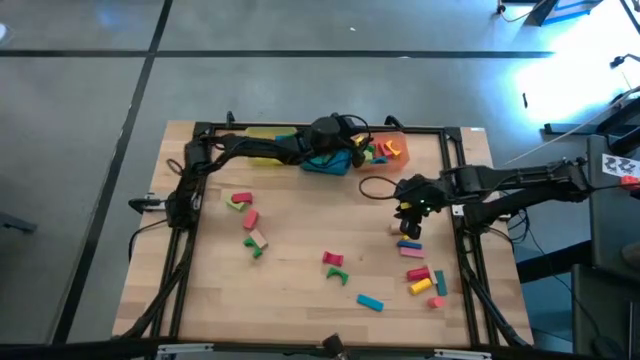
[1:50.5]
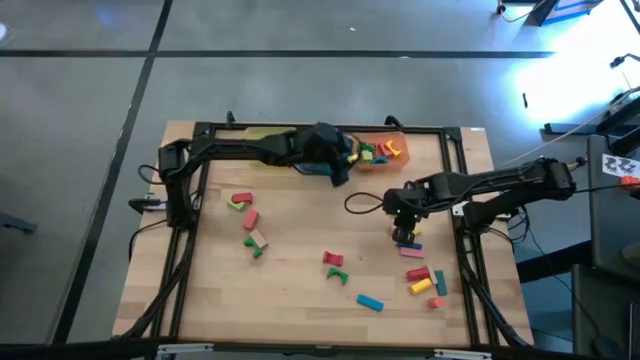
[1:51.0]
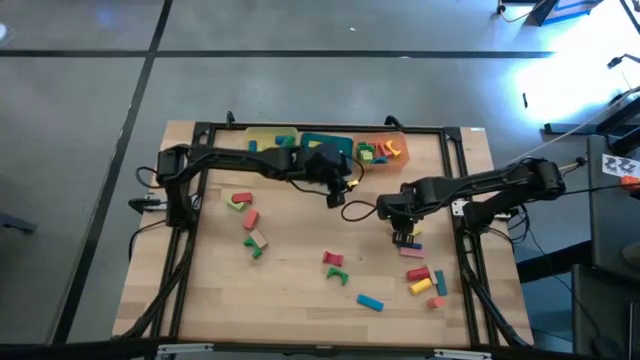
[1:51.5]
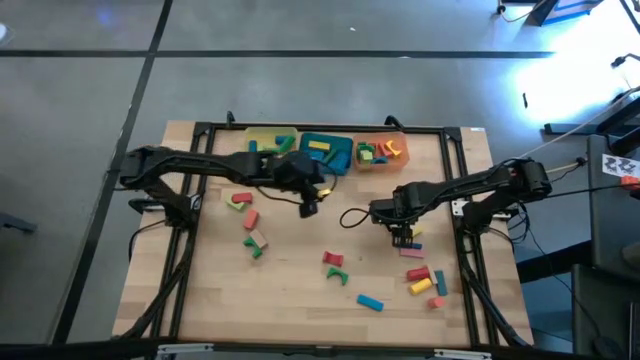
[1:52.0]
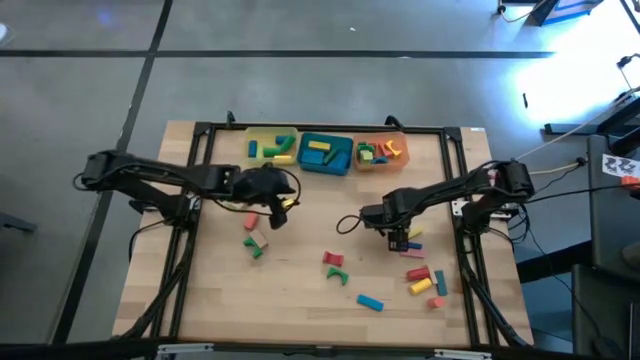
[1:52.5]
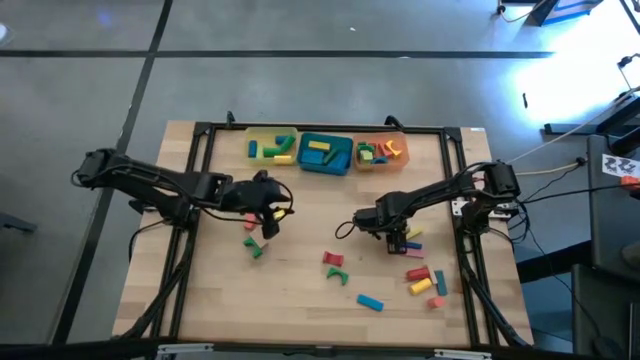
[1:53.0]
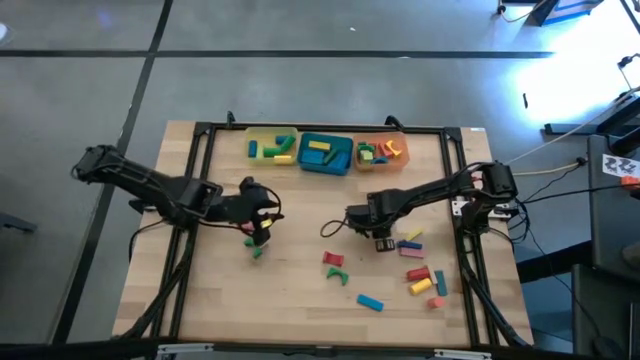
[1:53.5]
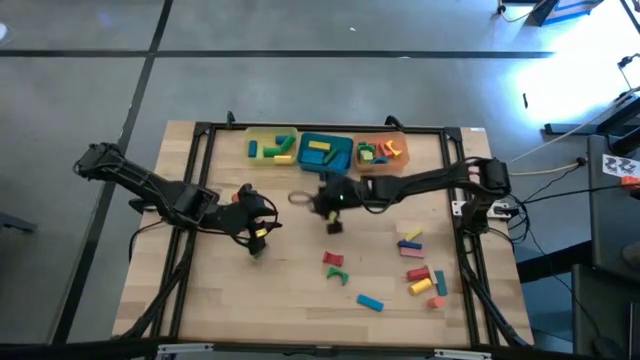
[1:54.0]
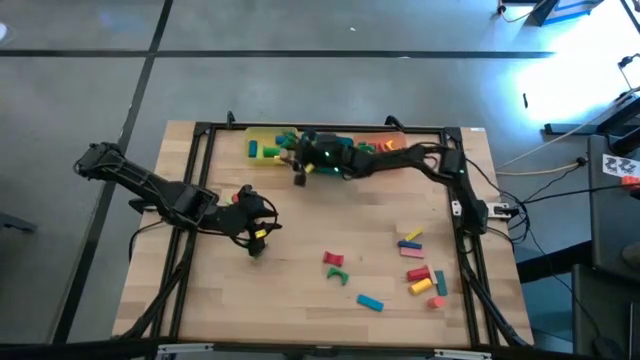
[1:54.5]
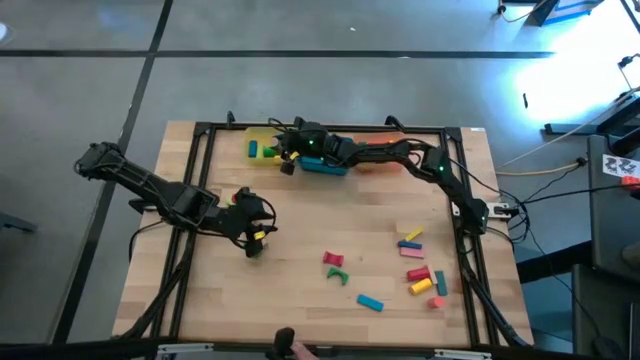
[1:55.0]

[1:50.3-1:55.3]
Task: Sort blocks by size
Put the brown cylindrical block into the yellow bin

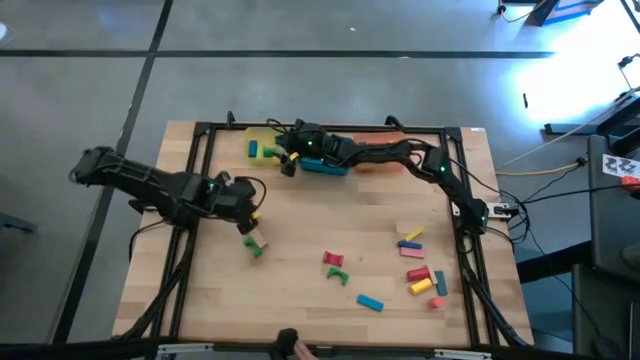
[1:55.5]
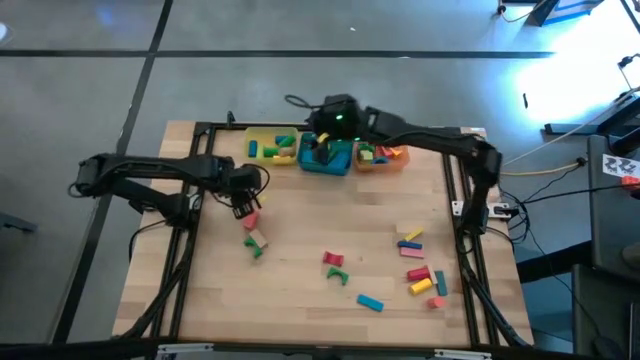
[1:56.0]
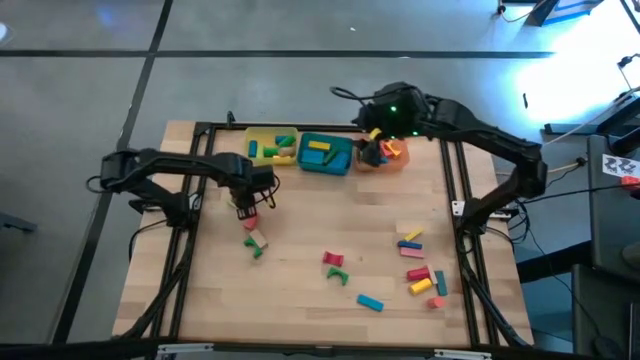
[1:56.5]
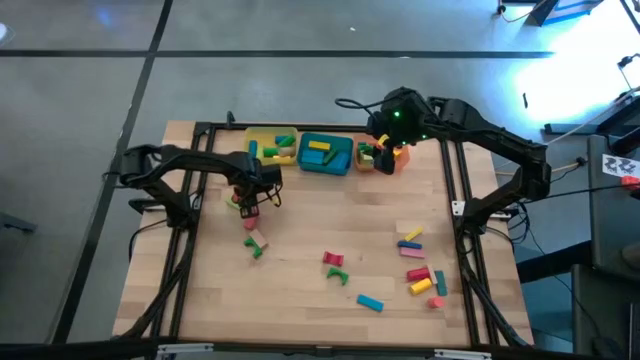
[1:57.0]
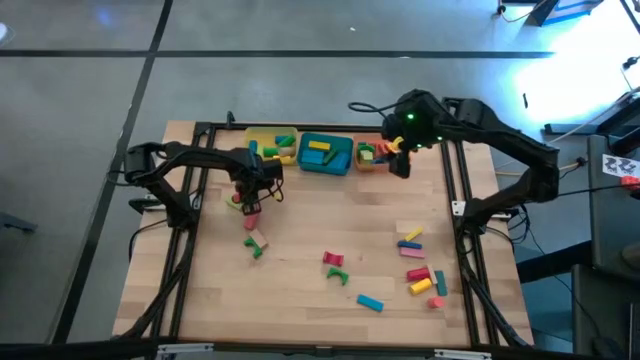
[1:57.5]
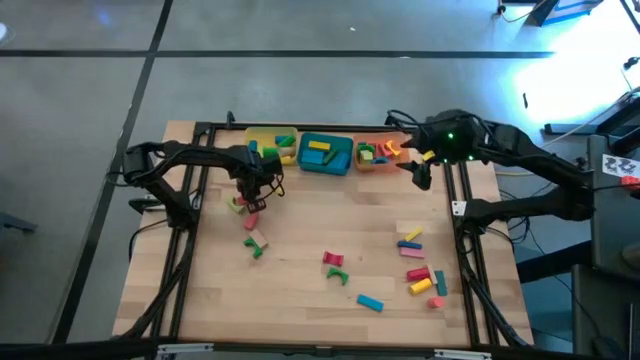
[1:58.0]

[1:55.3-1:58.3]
Put the red rectangle block into the orange bin

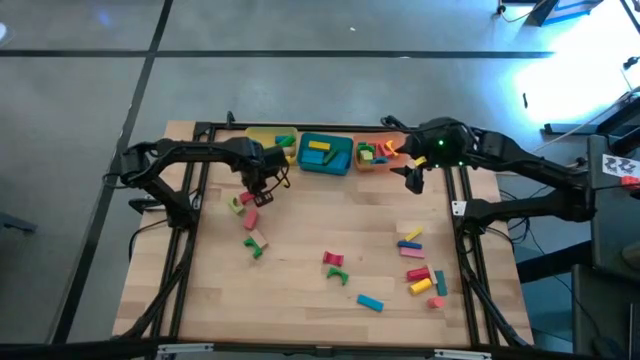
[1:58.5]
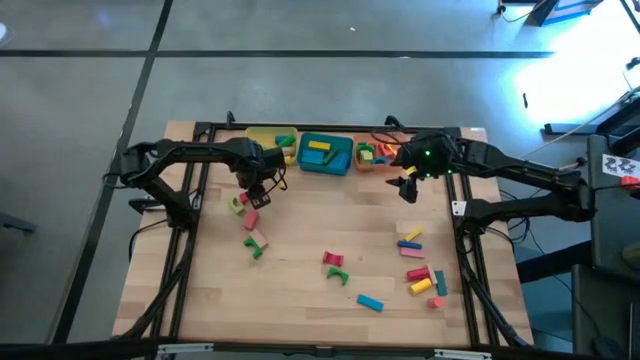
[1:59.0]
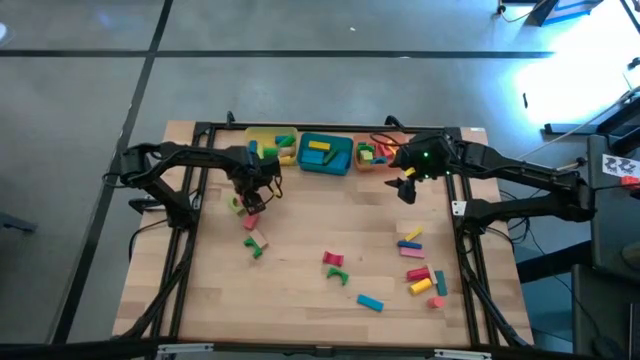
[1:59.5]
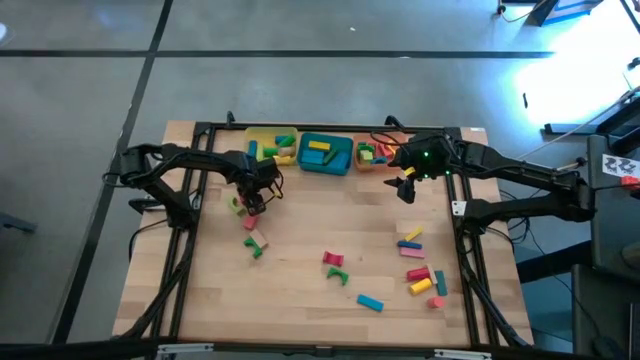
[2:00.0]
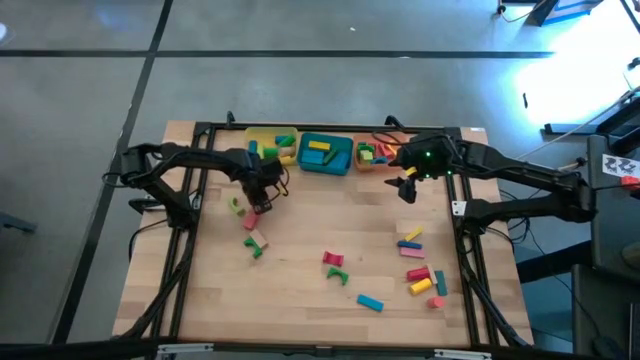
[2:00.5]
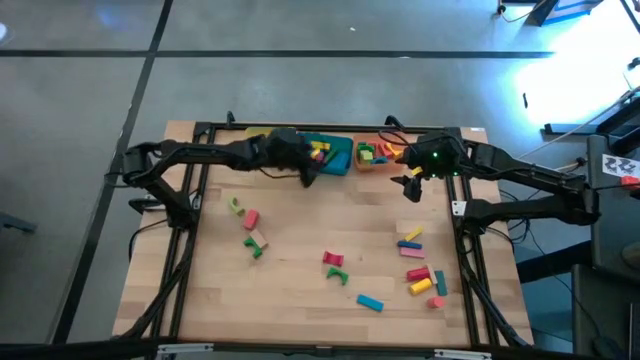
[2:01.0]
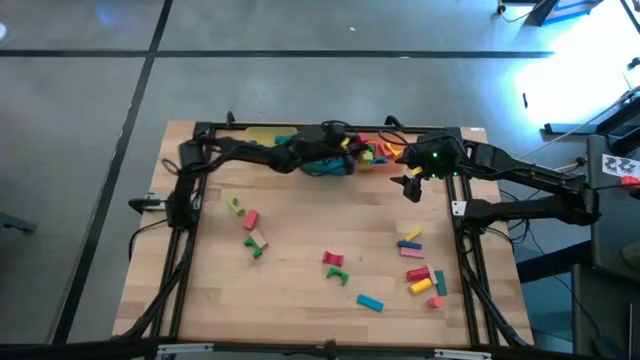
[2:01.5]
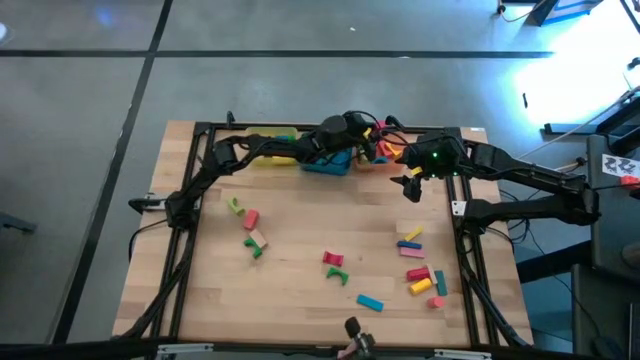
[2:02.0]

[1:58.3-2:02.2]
Put the red rectangle block into the orange bin

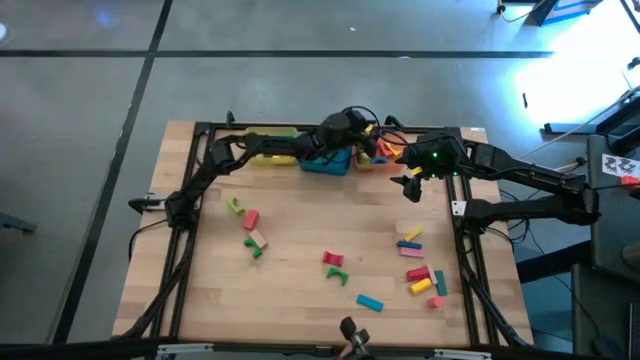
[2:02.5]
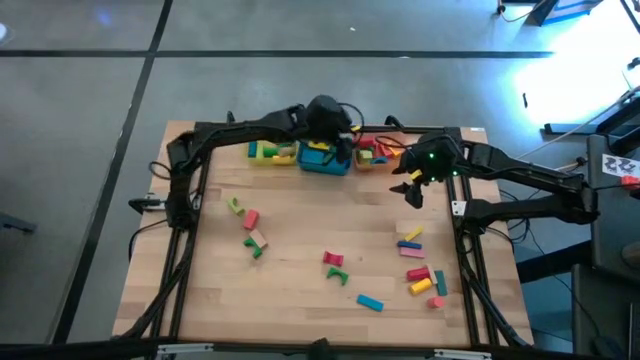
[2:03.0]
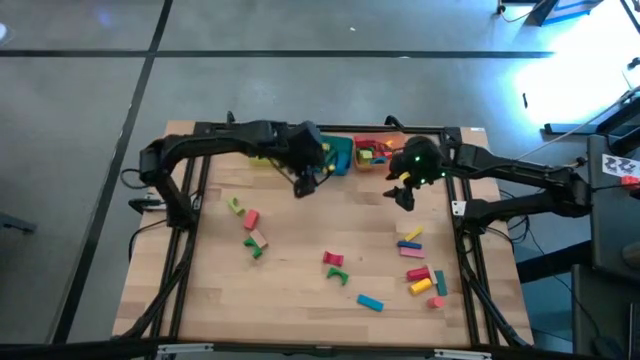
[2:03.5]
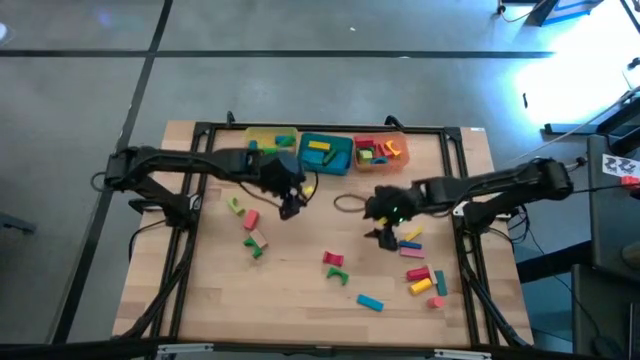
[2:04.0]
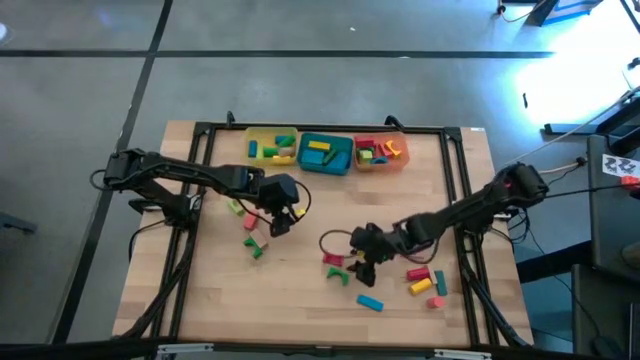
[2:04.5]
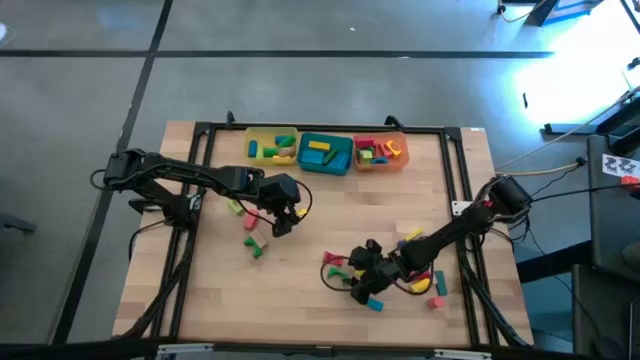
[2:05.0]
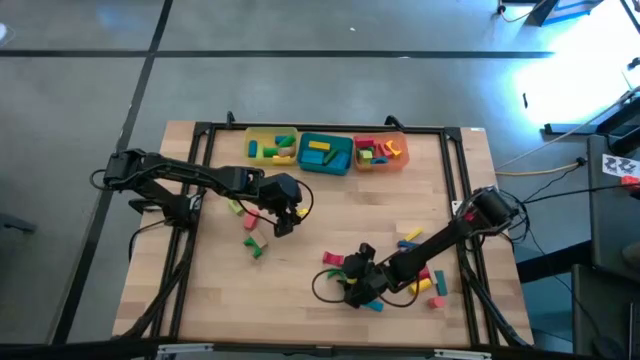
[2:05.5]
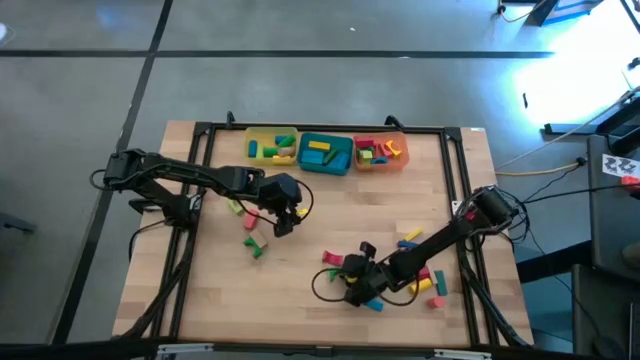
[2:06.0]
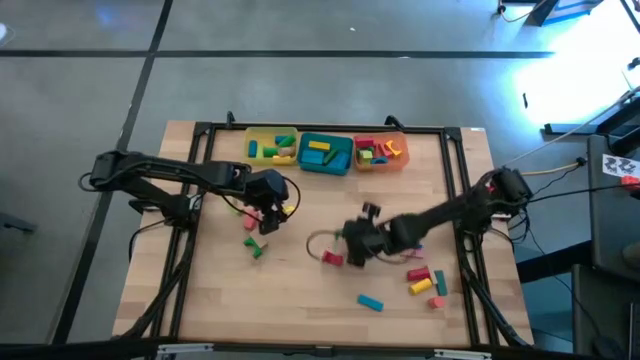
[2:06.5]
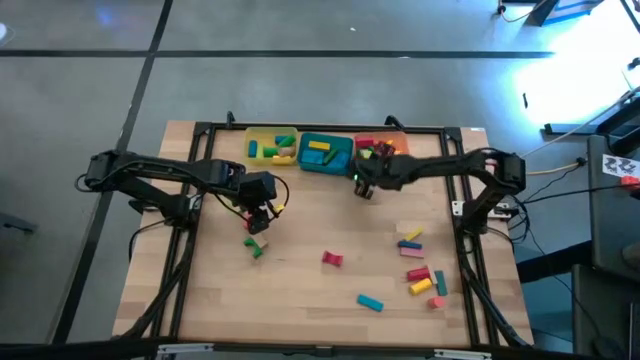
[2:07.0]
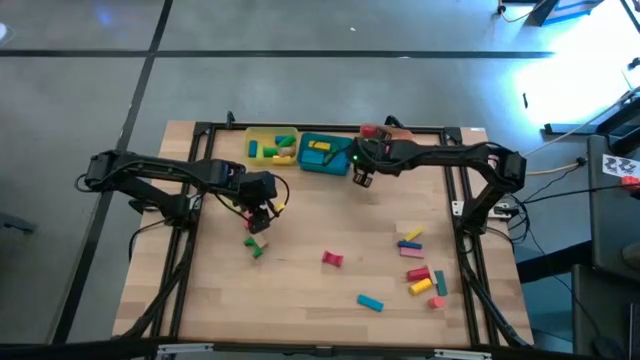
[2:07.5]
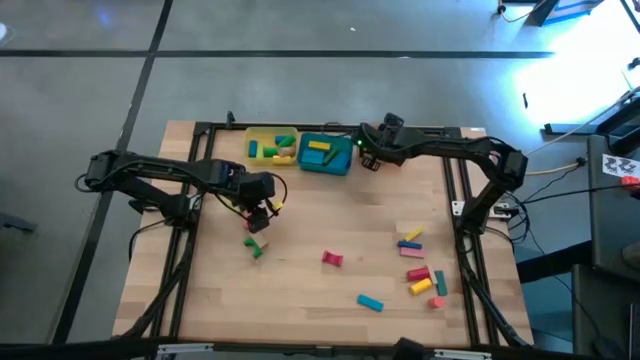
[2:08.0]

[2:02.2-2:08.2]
Put the green arch block into the orange bin

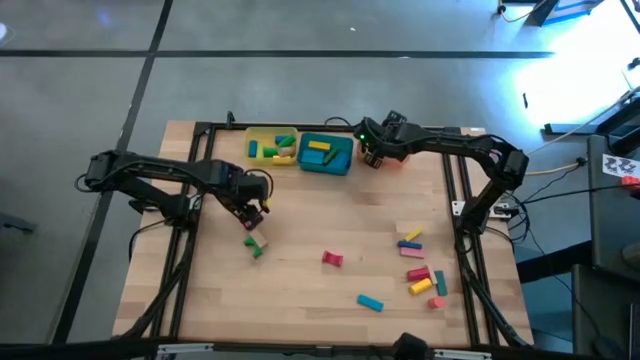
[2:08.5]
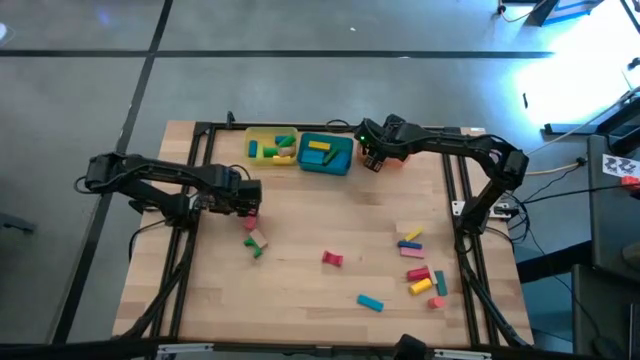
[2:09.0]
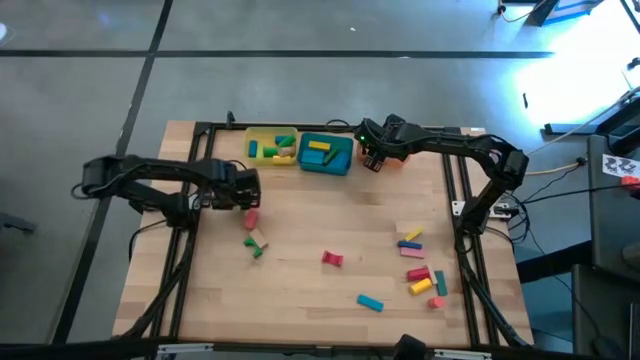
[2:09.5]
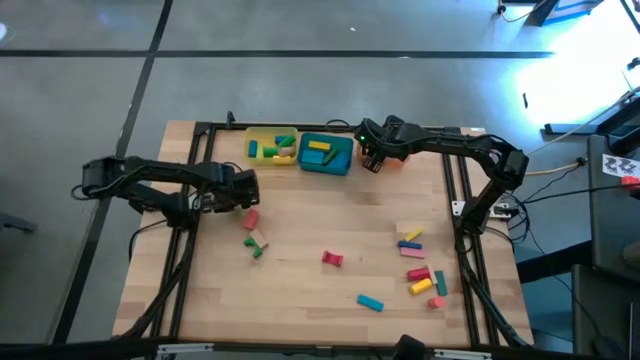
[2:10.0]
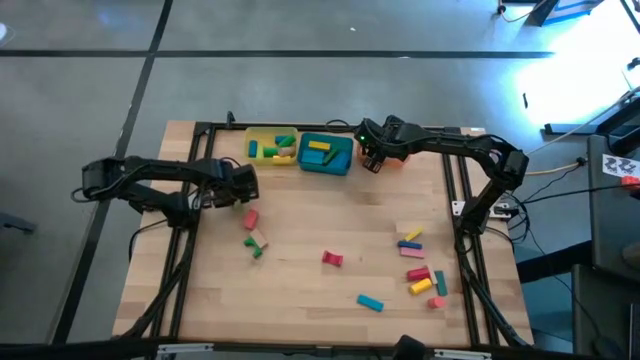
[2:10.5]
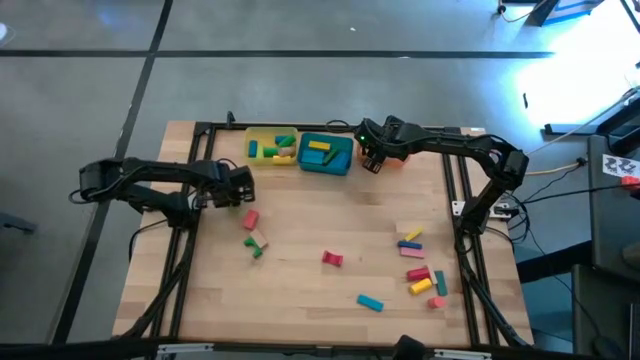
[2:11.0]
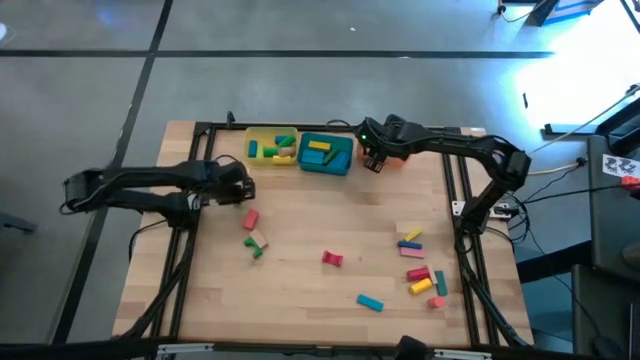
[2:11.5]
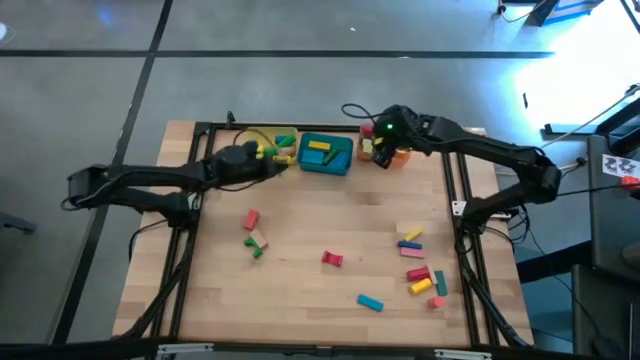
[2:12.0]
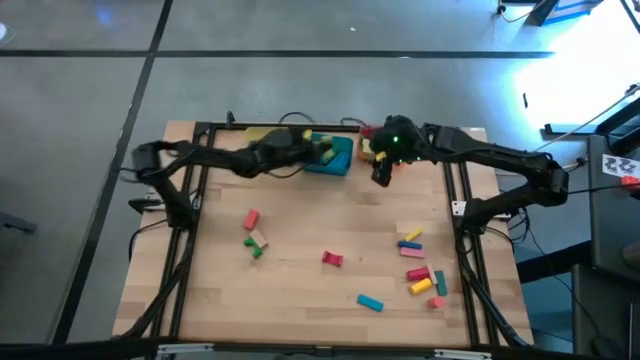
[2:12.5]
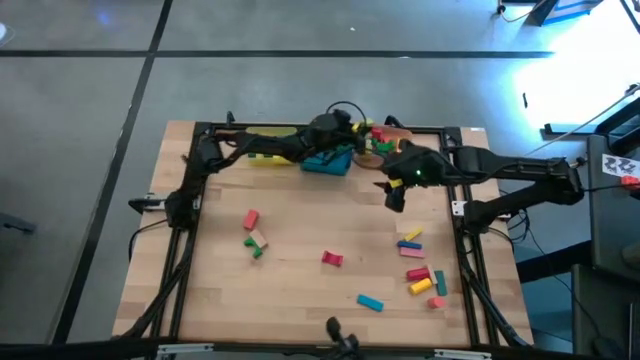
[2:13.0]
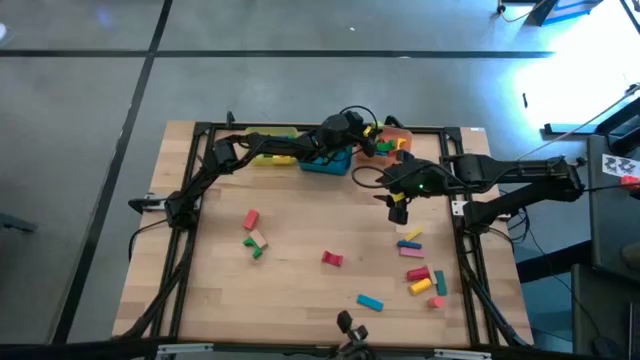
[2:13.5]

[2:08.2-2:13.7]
Put the light green arch block into the orange bin
